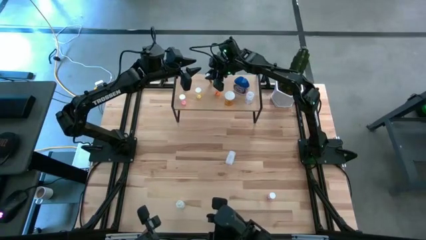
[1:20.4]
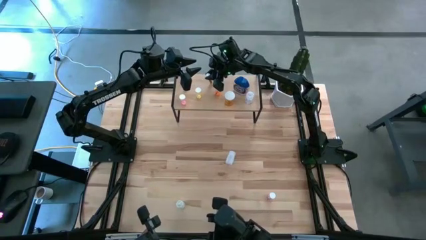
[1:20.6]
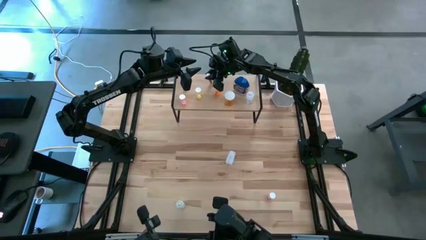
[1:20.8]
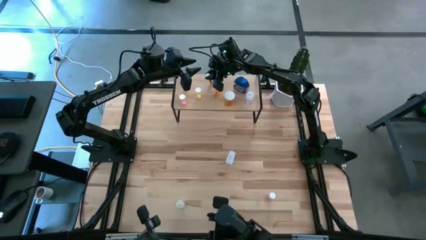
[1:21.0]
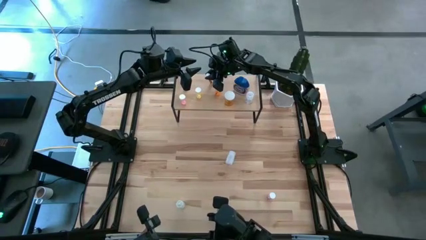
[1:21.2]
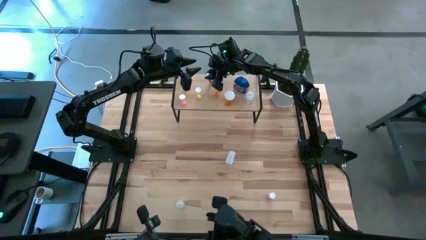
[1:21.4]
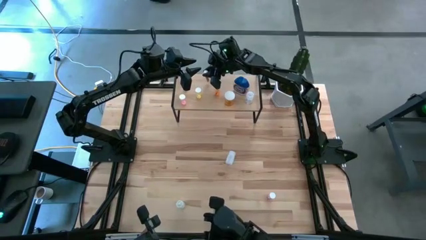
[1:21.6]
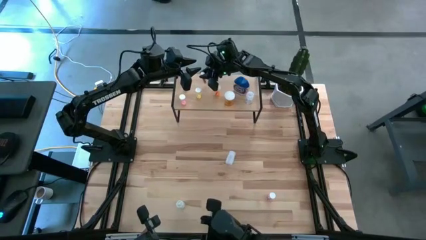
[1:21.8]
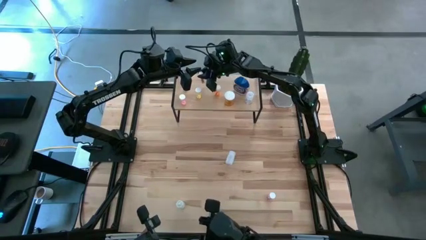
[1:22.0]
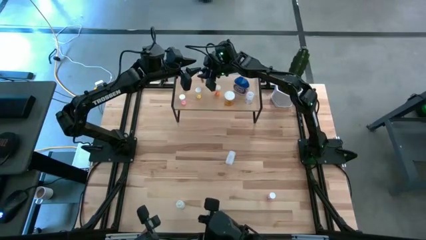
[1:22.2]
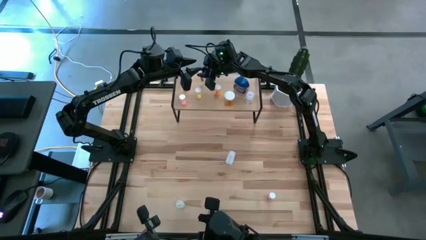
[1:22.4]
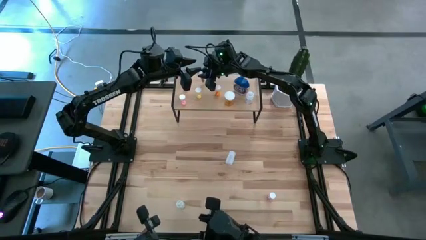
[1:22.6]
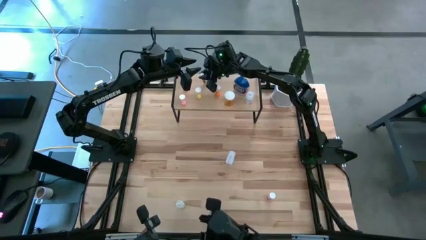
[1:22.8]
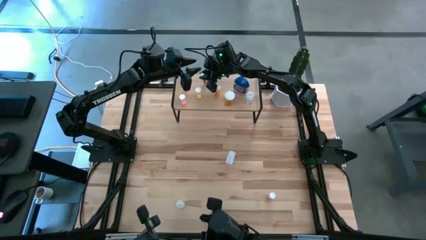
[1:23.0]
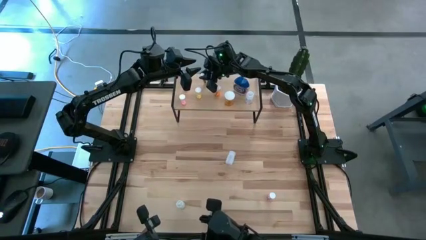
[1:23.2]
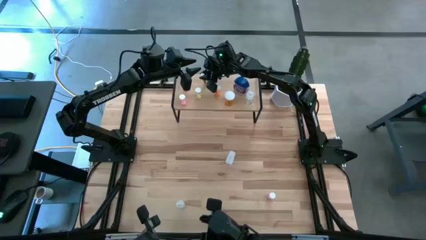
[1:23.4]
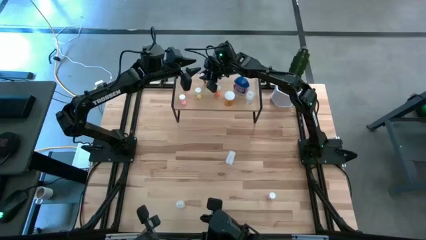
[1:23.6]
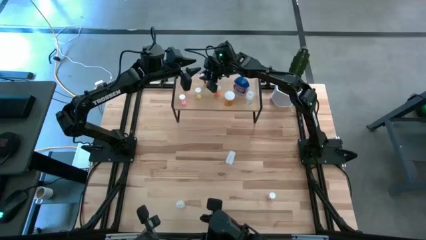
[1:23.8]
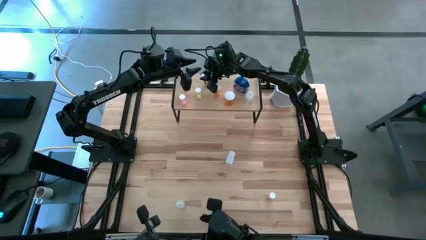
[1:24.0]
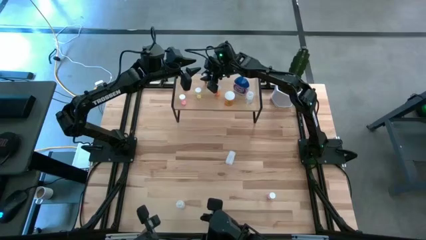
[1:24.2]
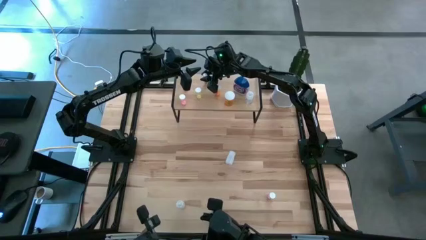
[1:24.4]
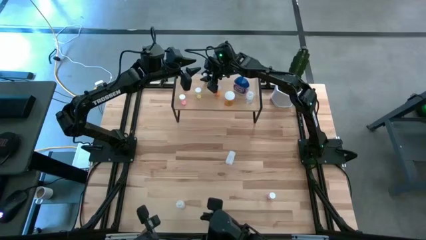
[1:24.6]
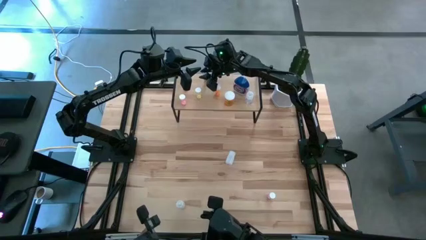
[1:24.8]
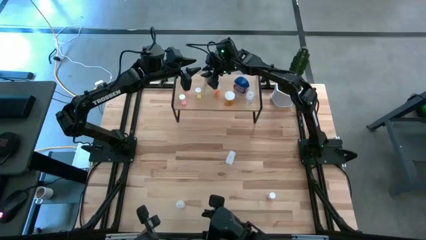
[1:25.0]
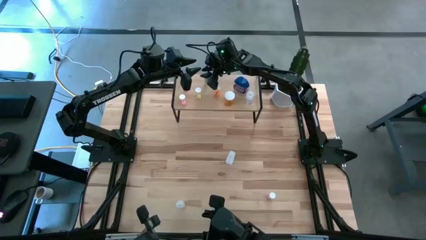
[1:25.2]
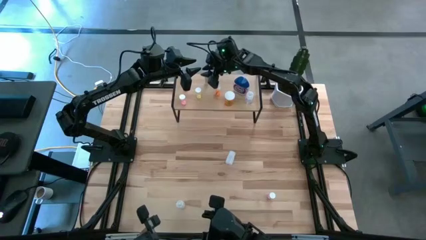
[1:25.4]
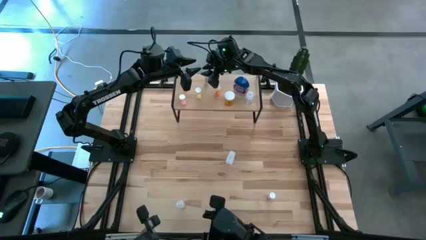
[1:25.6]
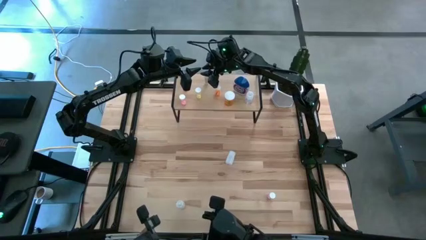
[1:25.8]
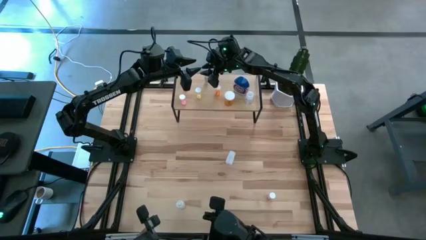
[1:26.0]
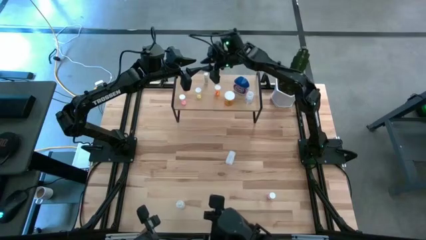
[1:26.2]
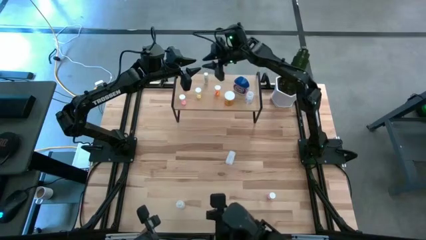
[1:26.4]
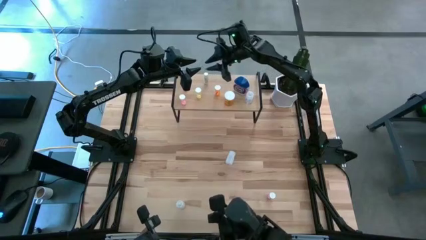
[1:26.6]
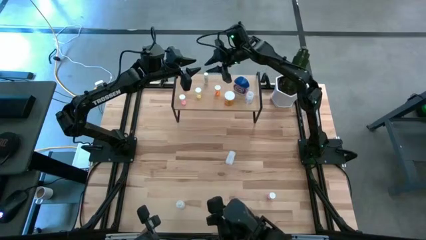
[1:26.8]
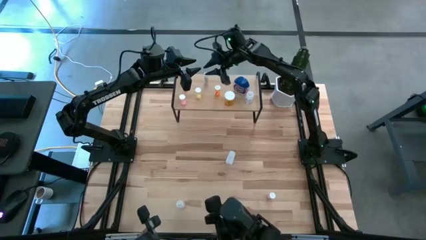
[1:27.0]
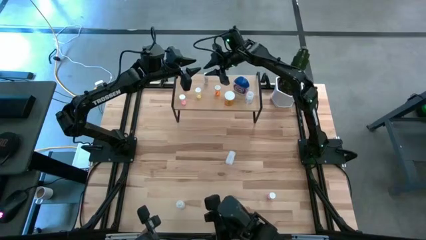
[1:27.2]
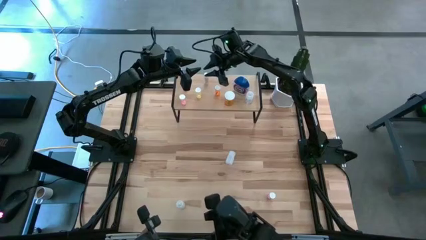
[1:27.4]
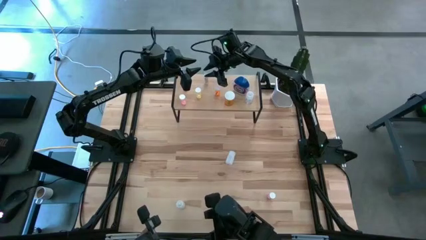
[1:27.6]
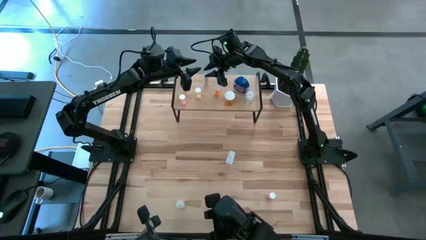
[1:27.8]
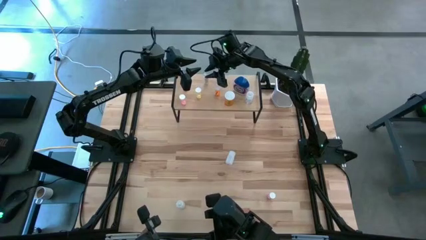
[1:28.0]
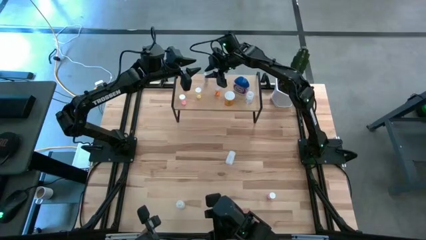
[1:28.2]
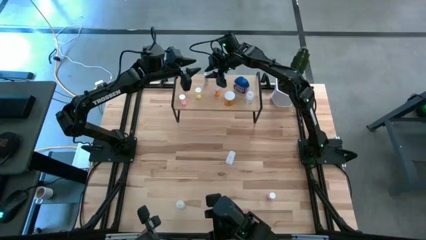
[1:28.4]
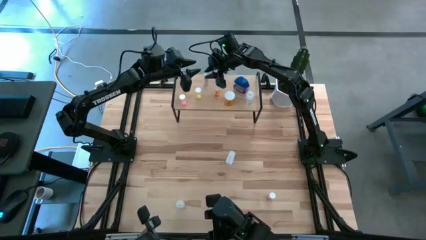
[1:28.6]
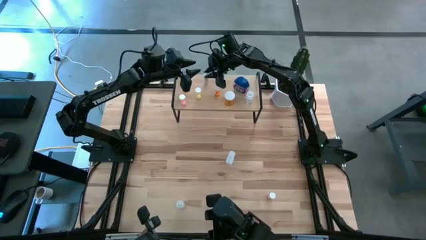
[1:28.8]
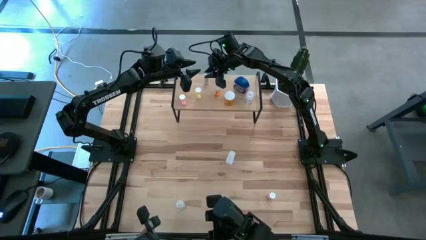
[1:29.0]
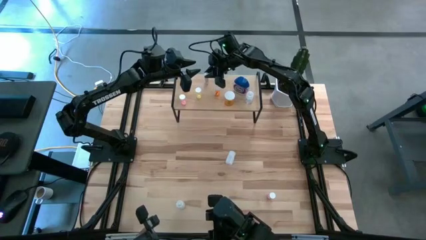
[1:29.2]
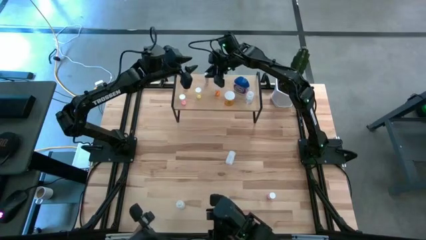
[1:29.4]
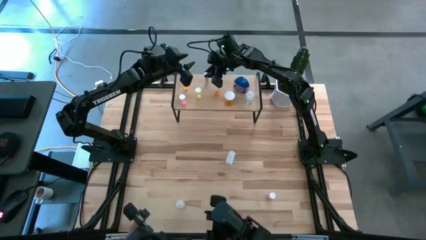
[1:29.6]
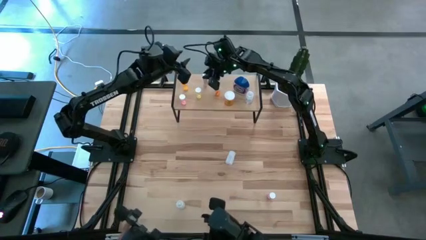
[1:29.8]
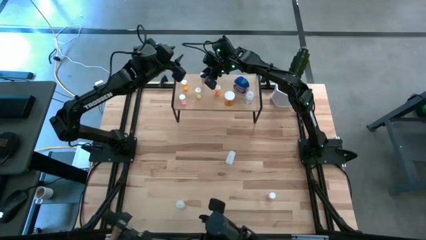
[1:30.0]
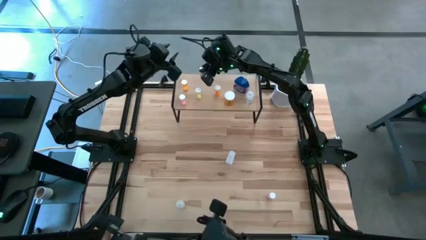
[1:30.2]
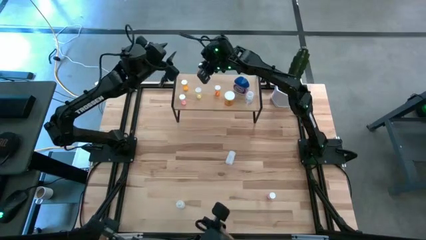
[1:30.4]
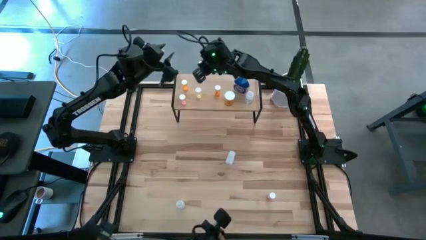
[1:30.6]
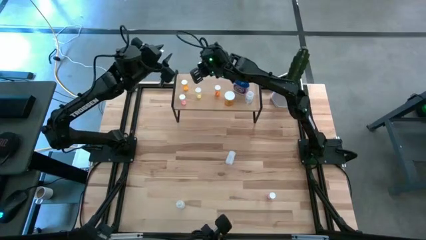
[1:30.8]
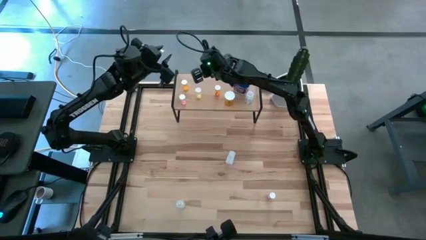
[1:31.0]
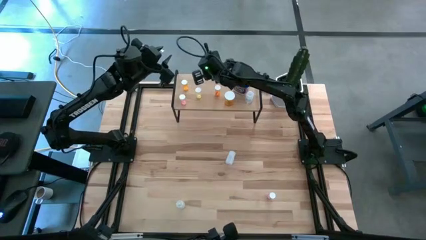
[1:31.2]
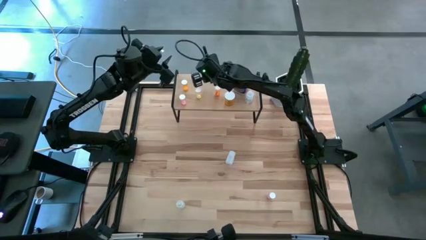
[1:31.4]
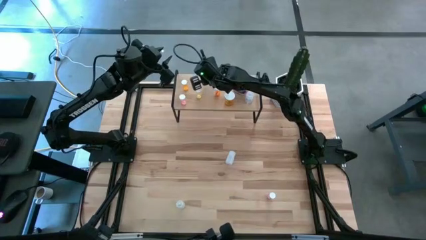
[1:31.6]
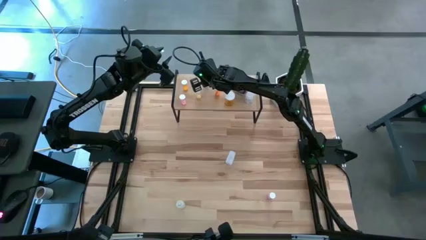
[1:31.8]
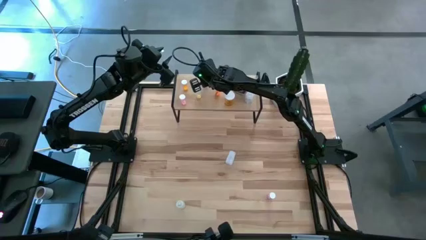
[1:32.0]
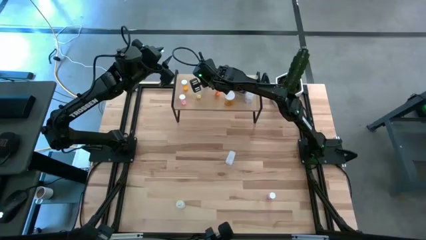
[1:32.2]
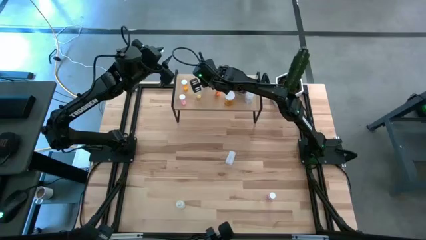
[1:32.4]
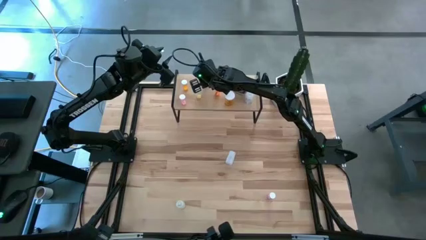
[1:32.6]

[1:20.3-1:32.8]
Task: Pick and place medicine bottles onto shelf by color
Put the white yellow pill bottle on the shelf

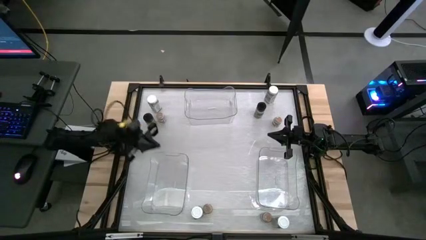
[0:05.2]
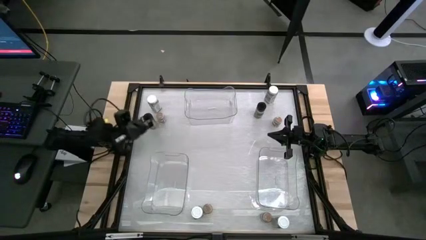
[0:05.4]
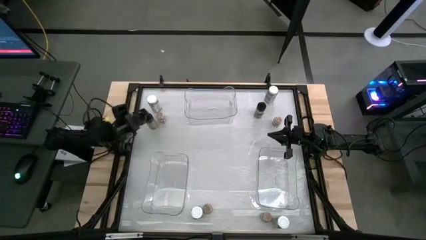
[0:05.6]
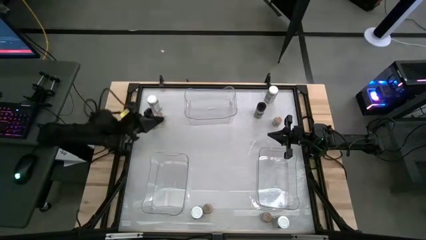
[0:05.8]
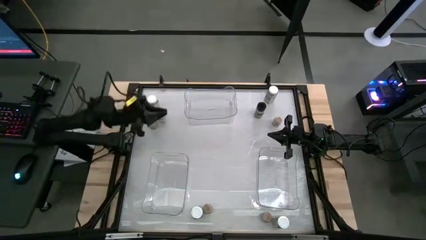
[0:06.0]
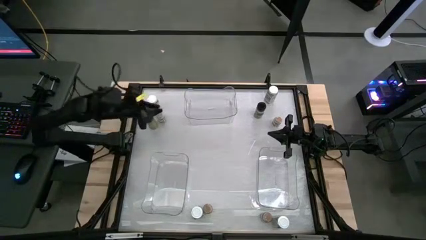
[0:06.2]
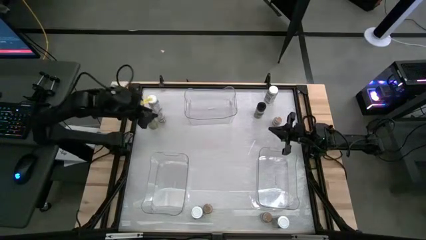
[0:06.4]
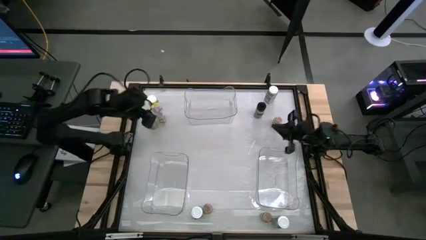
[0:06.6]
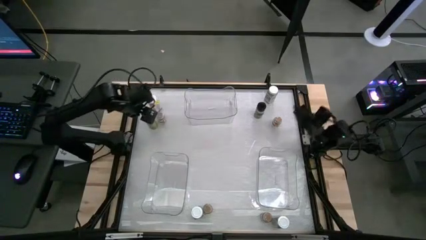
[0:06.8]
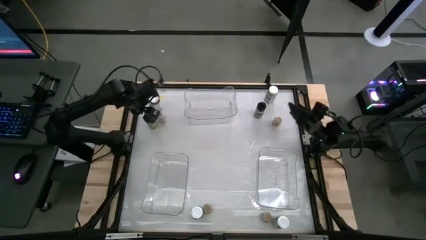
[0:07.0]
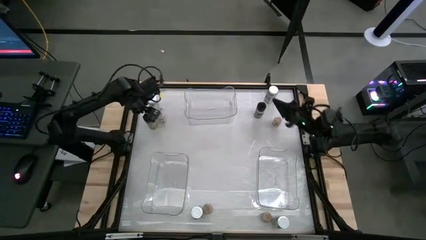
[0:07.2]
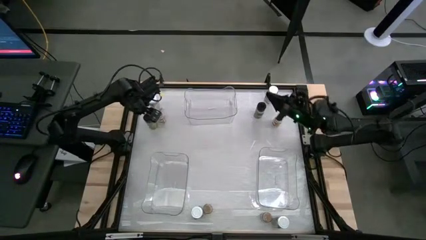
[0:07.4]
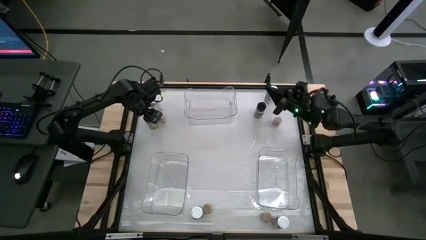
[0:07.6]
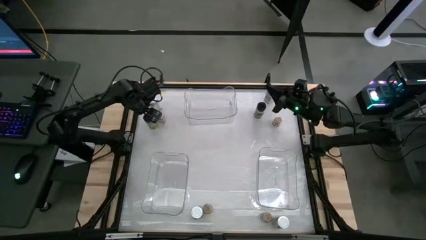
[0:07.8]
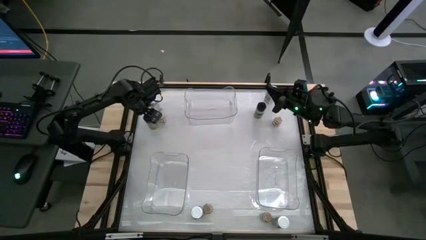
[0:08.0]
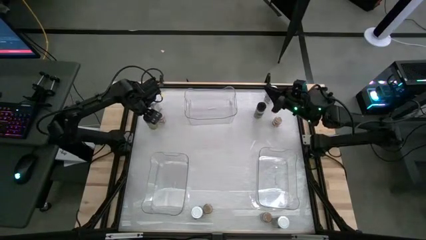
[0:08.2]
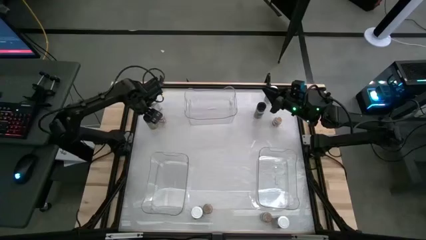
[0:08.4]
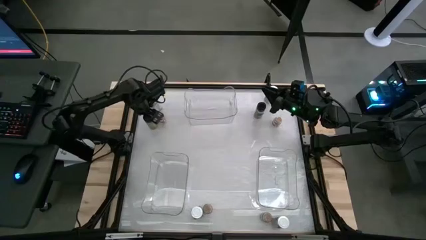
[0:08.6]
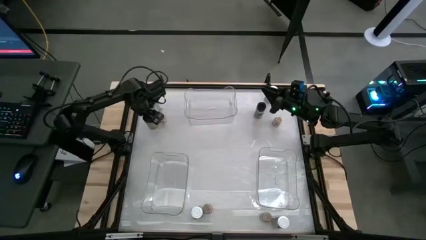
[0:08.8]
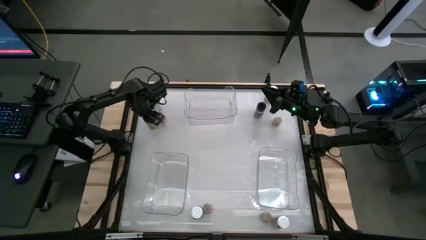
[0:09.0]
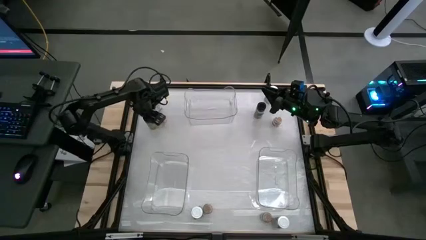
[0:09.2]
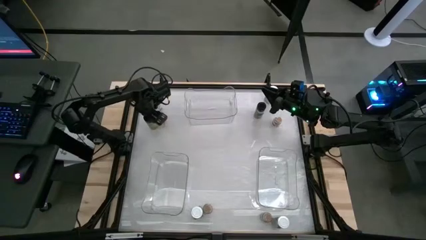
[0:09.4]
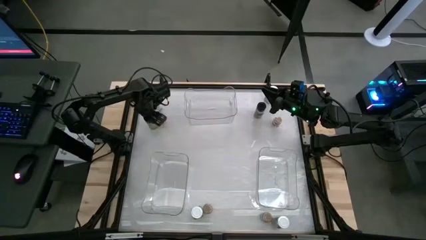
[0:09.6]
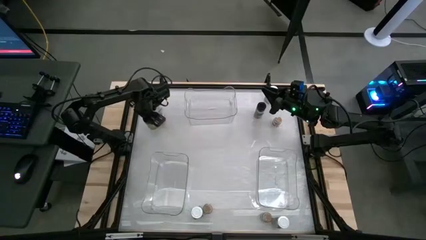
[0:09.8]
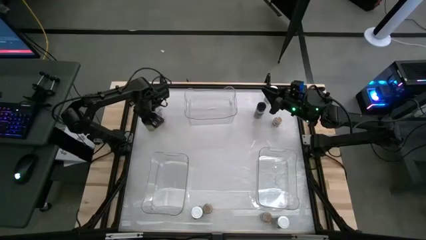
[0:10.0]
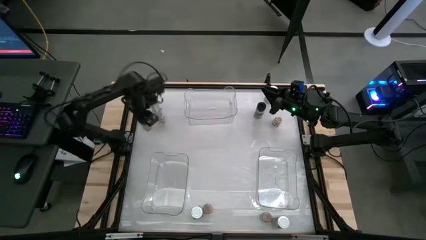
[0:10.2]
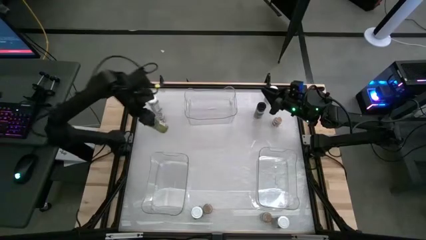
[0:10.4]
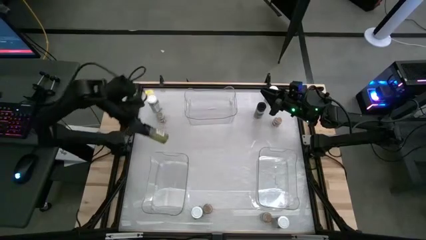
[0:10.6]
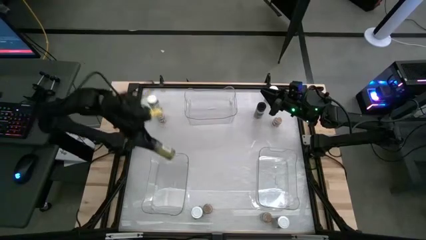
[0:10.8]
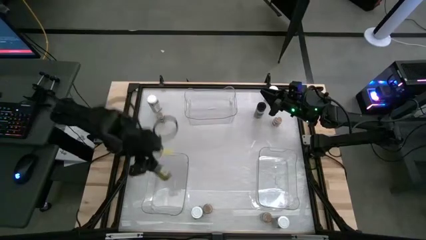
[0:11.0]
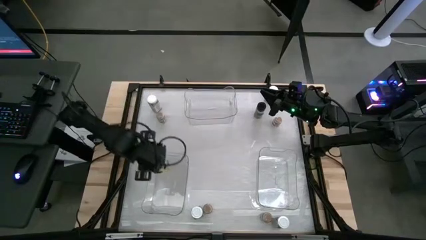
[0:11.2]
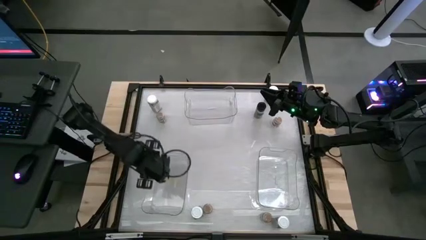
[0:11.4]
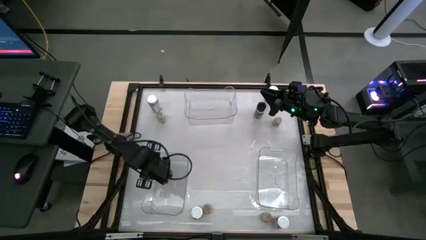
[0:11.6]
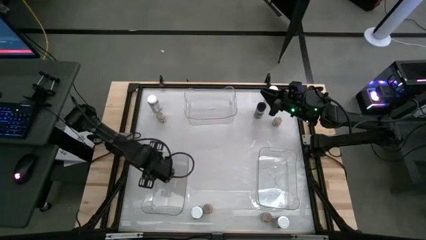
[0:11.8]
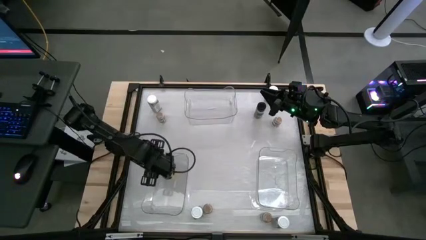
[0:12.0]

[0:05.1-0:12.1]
Task: Sort spices by type
Put the green seasoning bottle into the bottom left transparent bin
